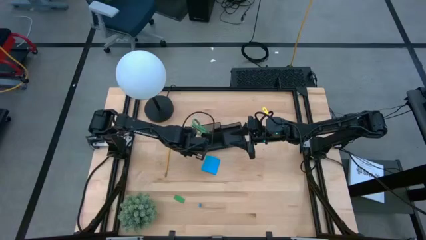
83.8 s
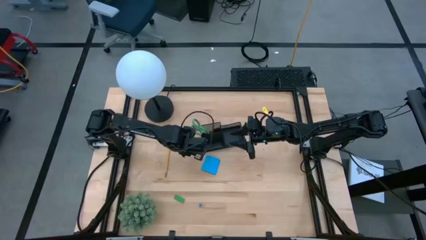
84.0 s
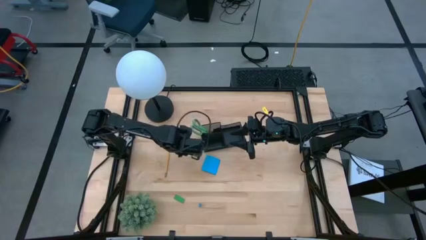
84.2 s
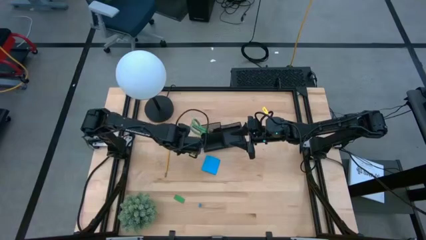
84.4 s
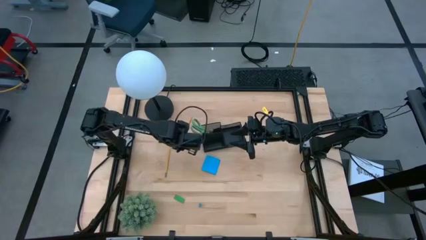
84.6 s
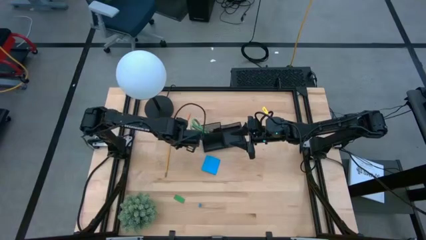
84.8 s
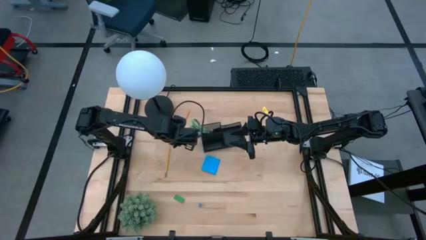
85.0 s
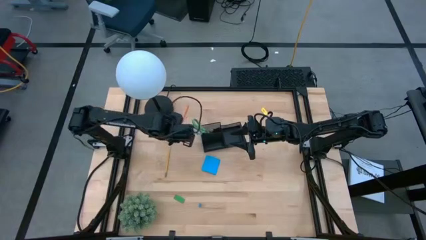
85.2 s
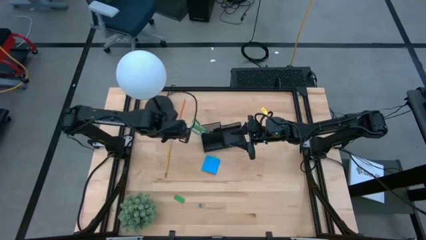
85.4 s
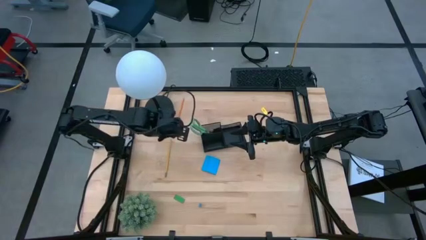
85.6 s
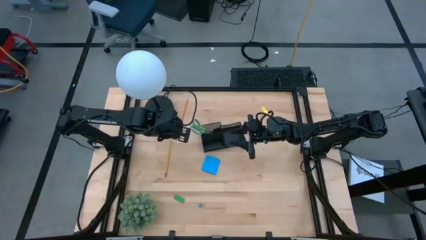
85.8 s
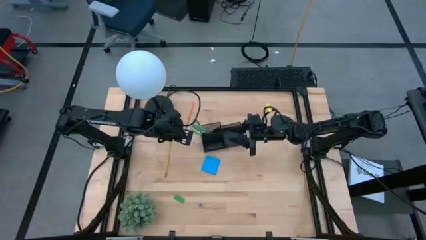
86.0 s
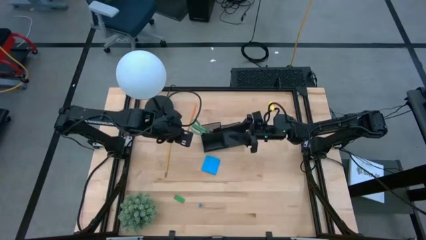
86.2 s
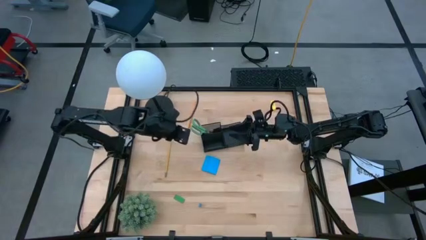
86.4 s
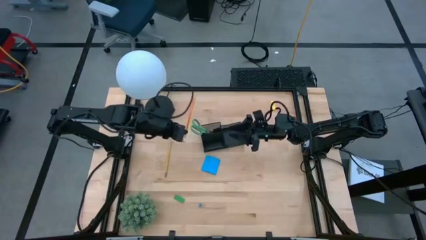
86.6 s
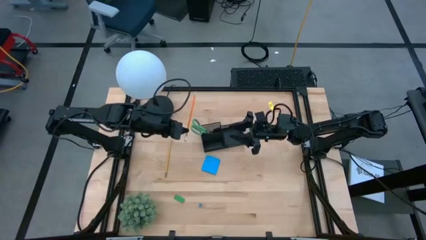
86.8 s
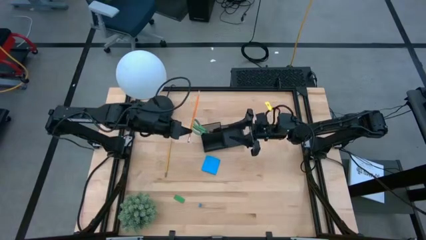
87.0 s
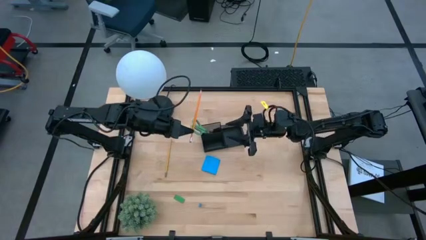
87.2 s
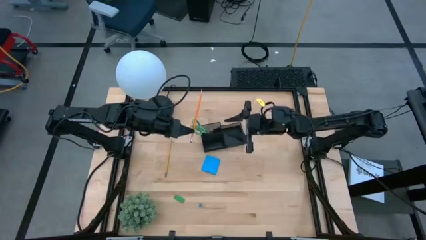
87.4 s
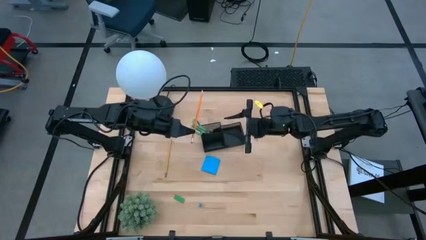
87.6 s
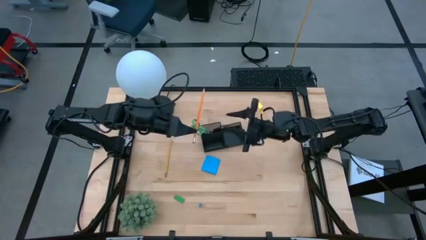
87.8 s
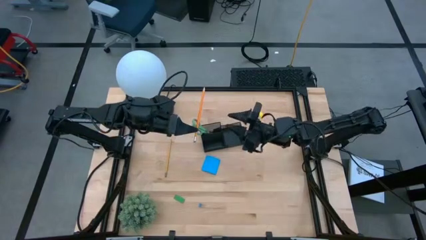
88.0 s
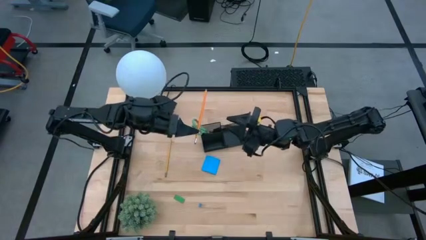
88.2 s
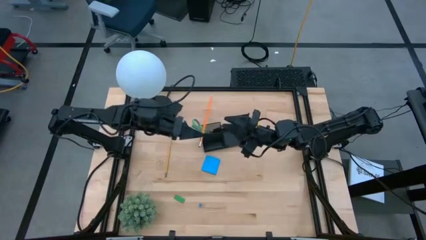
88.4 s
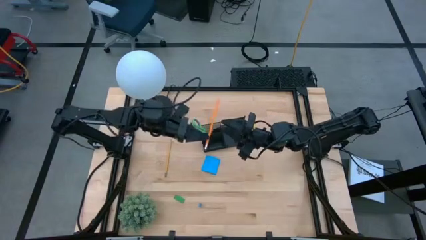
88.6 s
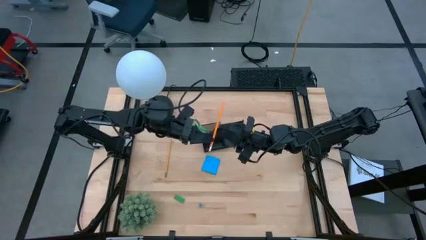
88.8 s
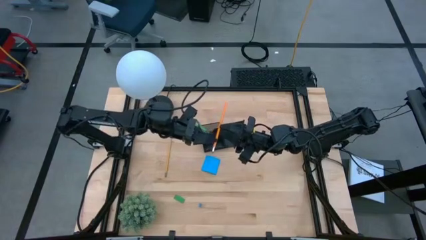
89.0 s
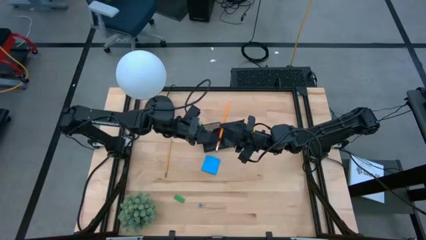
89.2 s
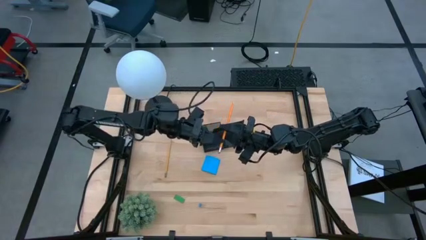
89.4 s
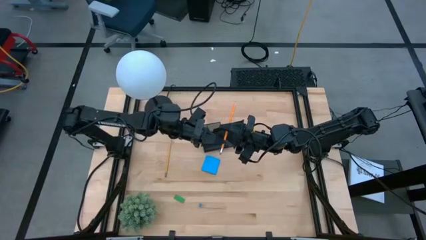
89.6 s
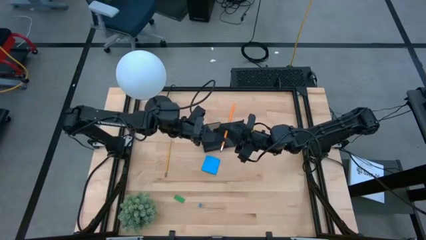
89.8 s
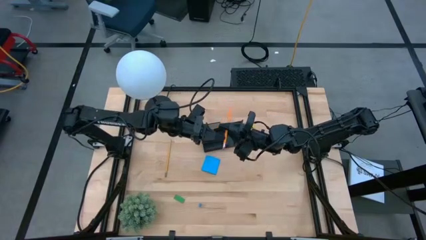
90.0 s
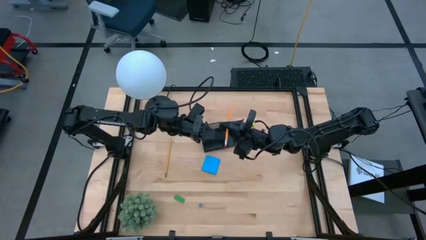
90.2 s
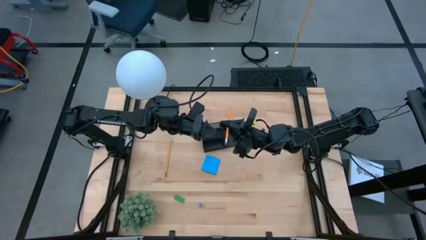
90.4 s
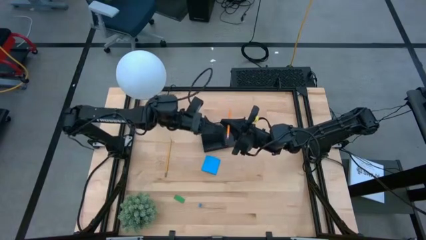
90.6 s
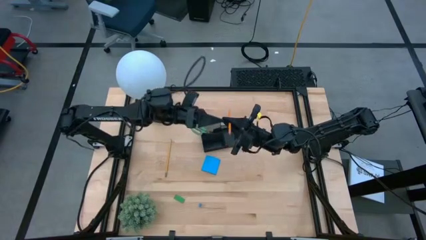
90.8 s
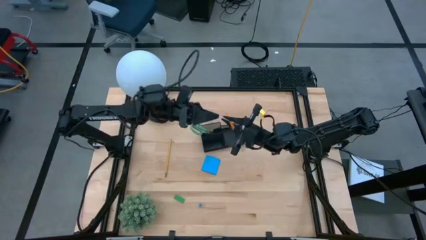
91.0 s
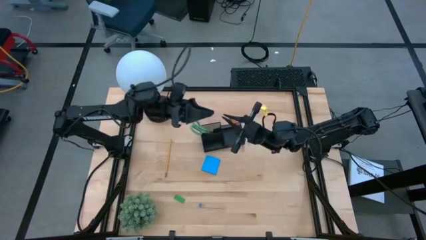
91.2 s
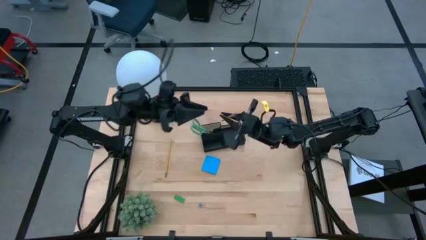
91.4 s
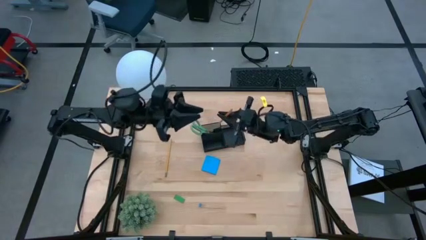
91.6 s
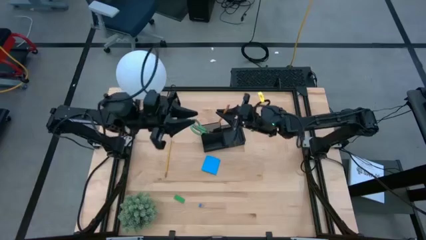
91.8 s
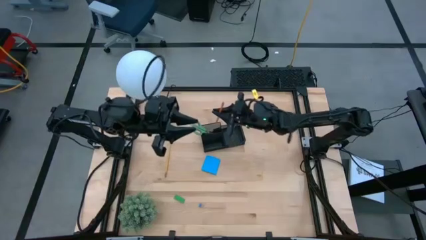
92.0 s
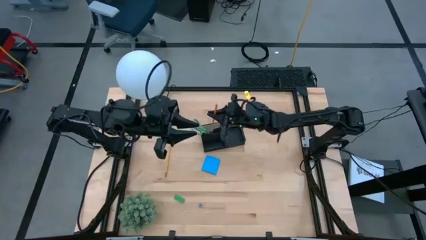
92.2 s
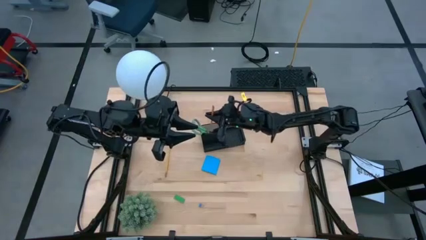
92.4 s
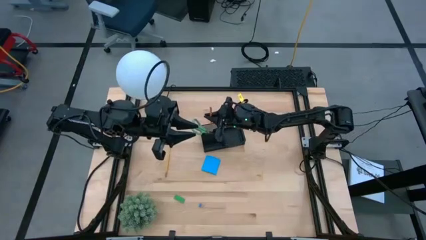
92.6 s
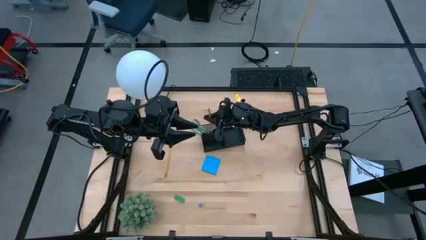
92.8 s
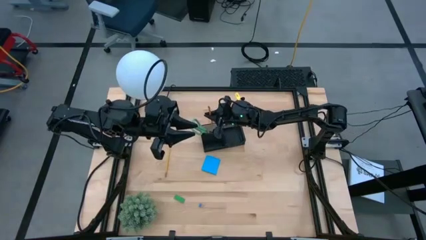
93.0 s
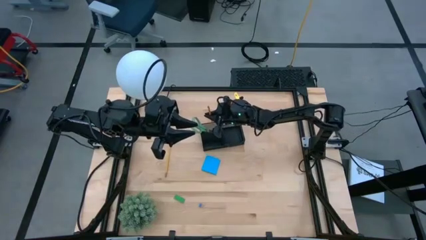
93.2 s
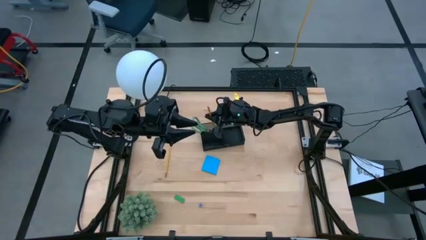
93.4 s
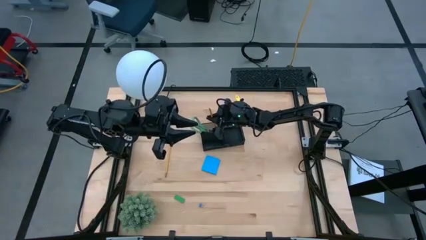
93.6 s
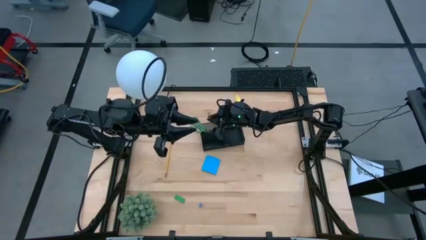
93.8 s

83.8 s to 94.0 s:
Task: Pick and place office supplies into organizer
Put the orange pencil into the black desk organizer

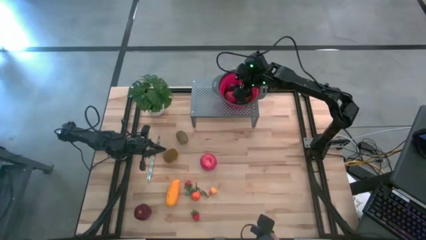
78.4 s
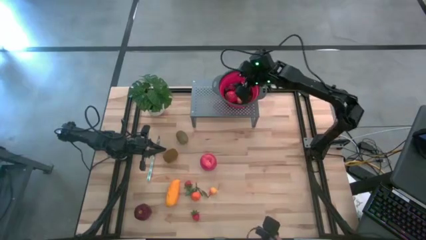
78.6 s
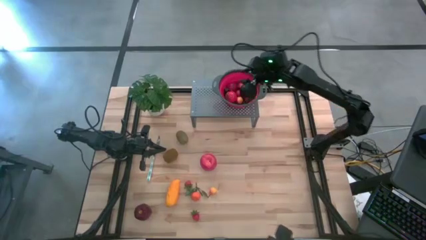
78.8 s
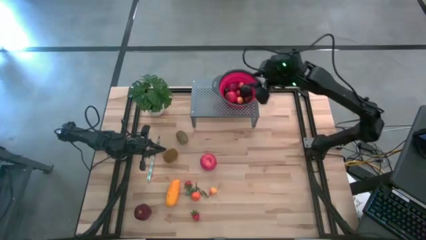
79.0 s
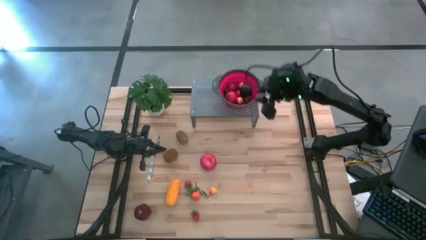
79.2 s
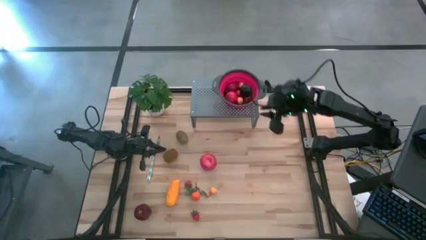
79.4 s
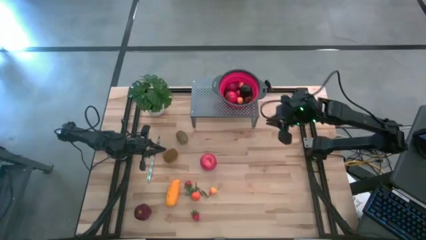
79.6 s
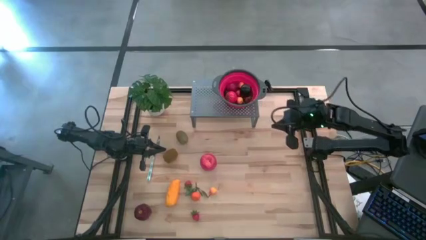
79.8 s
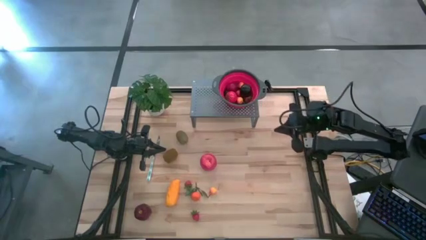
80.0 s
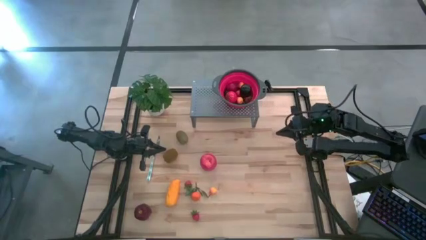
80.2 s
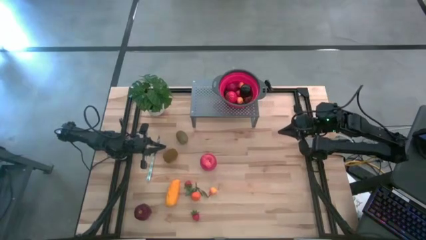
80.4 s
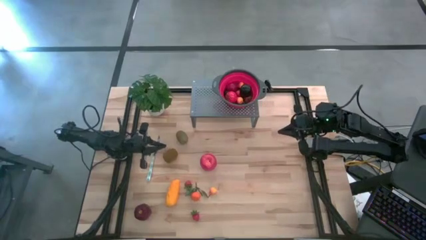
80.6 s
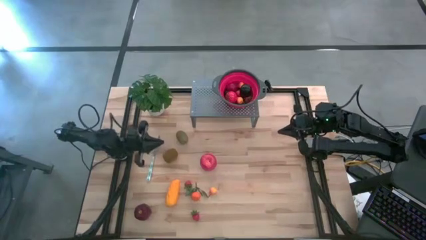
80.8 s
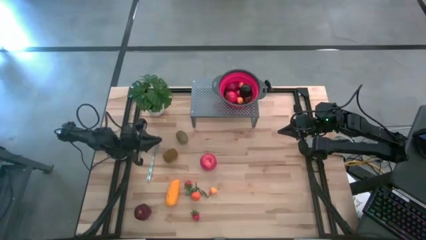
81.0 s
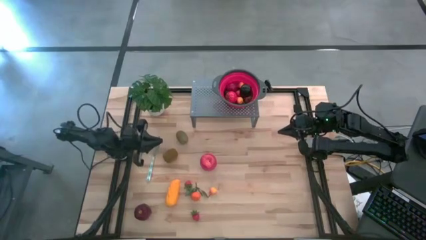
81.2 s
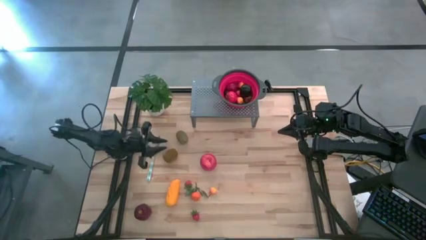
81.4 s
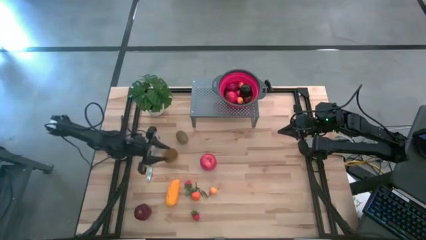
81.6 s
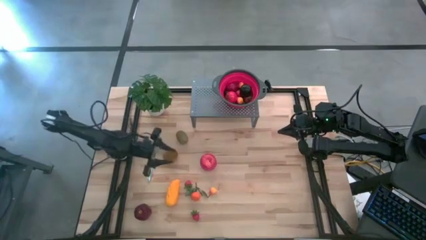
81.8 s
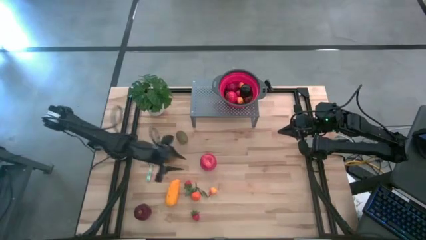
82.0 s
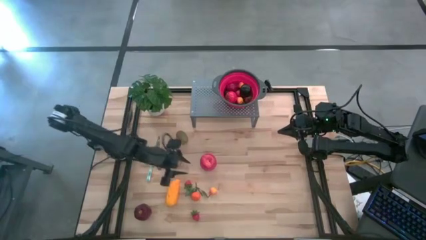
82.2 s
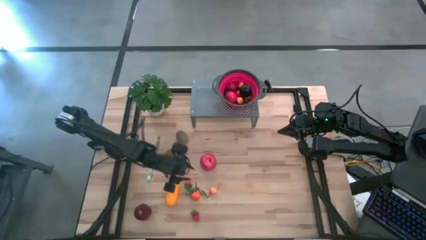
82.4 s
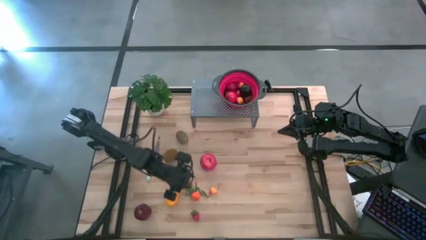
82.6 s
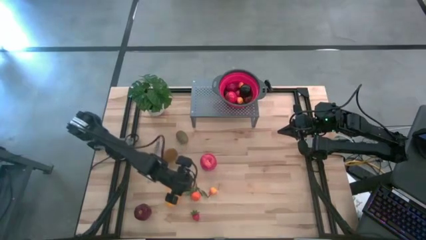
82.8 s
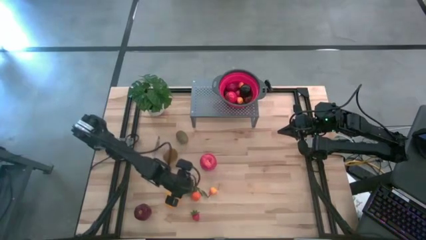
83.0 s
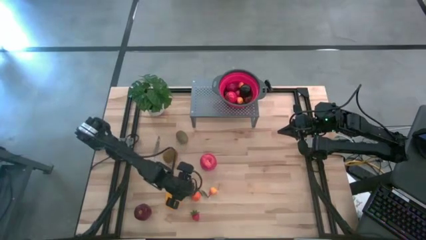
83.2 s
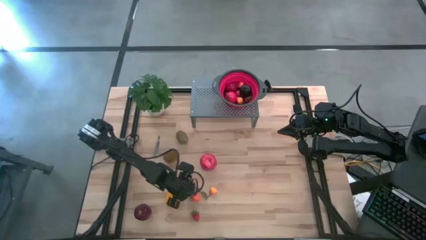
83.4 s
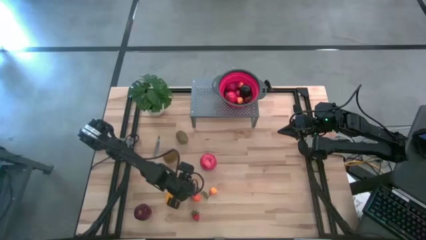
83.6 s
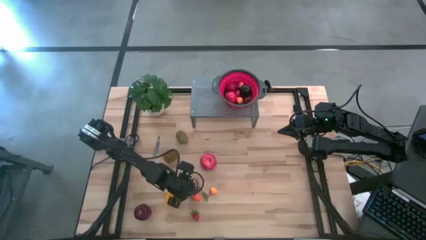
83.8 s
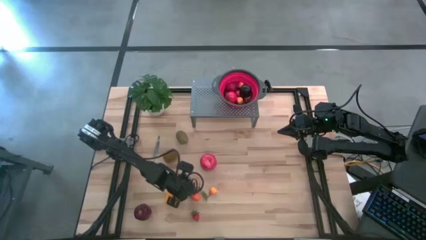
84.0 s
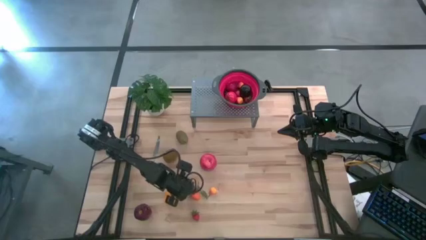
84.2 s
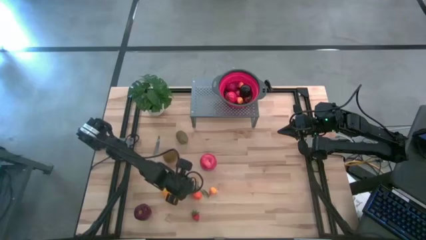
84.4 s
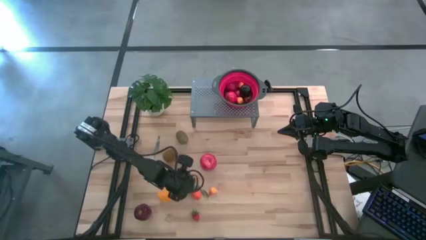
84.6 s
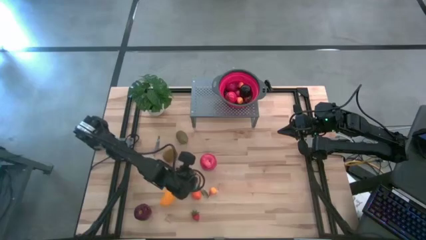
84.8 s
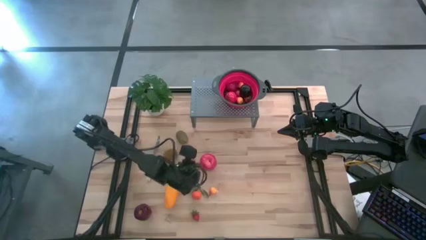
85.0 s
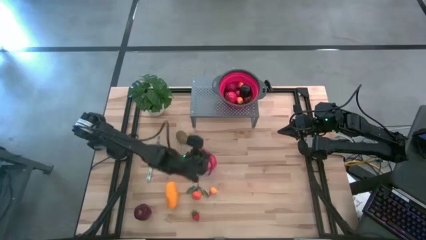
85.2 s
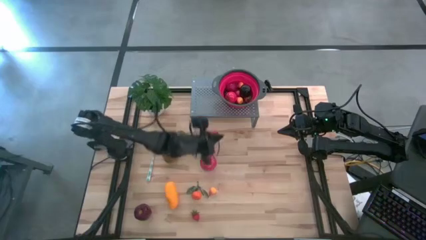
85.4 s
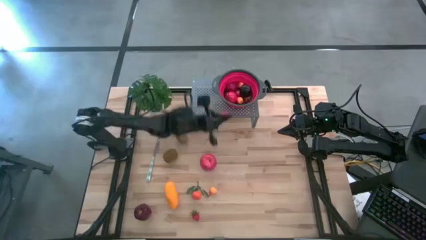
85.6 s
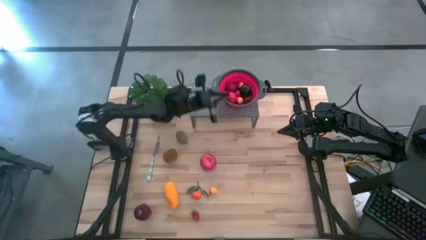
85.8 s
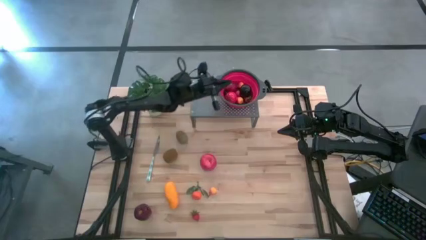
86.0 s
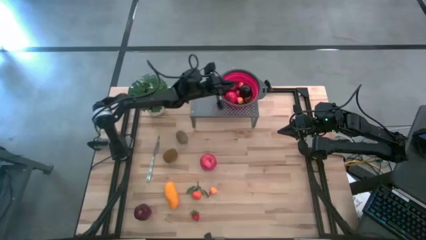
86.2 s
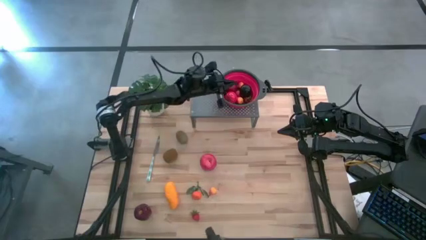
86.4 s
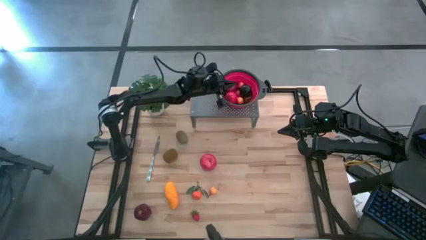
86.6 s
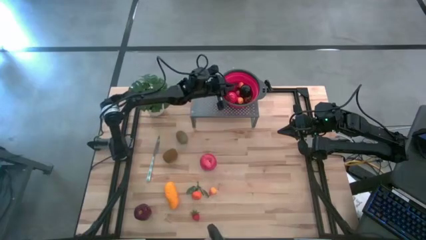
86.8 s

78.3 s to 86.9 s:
Task: Pick & Place Fruit
Put the strawberry into the strainer bowl on the shelf
